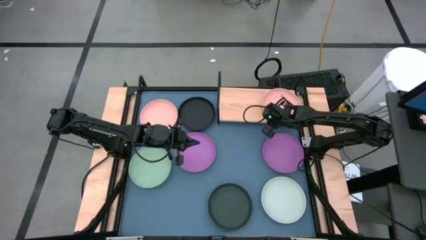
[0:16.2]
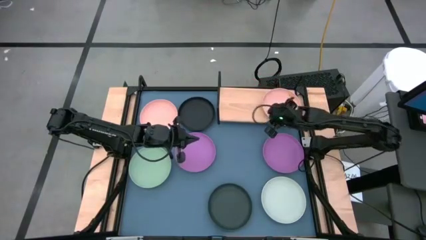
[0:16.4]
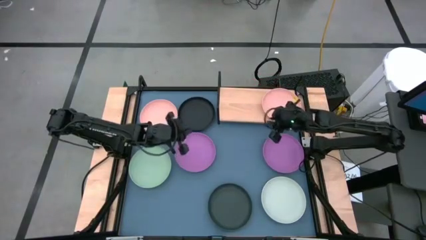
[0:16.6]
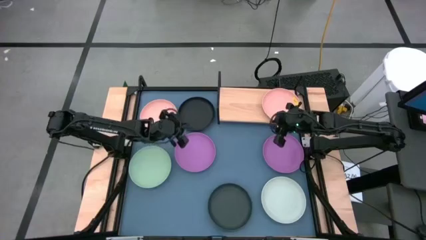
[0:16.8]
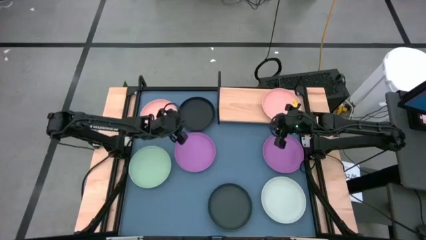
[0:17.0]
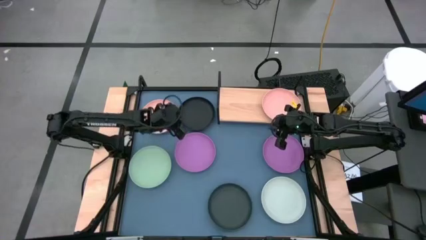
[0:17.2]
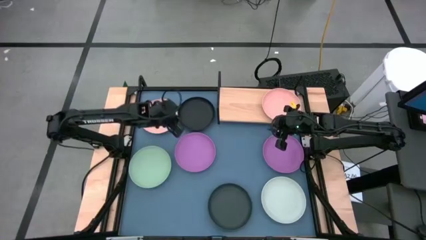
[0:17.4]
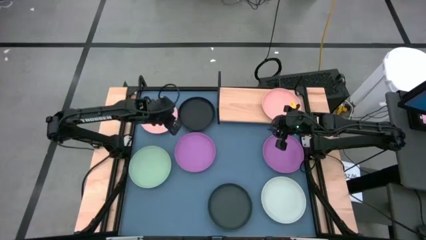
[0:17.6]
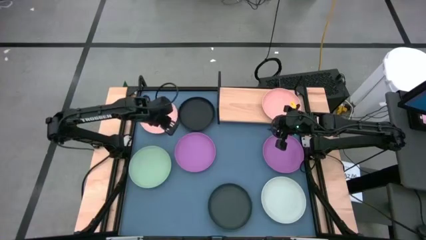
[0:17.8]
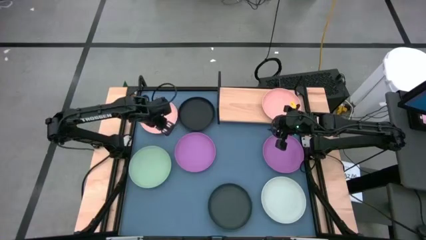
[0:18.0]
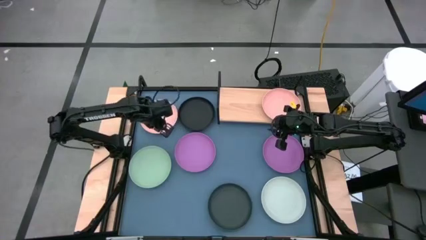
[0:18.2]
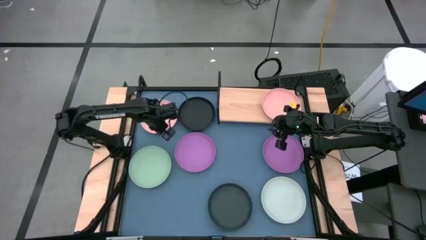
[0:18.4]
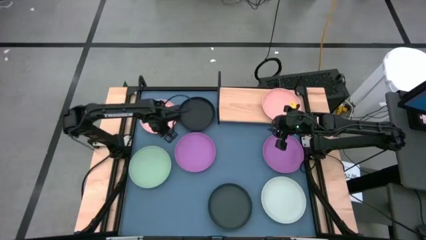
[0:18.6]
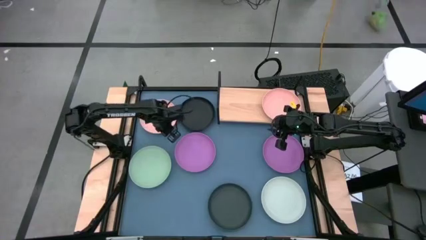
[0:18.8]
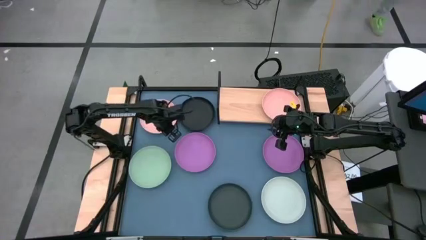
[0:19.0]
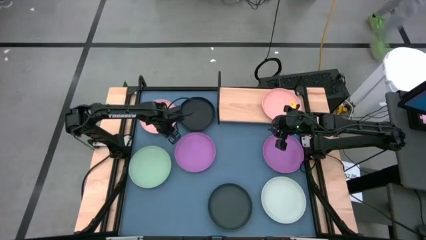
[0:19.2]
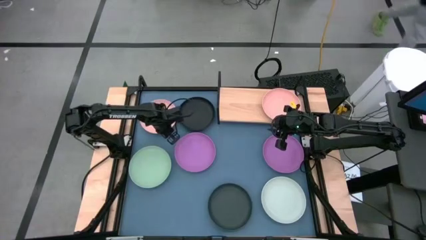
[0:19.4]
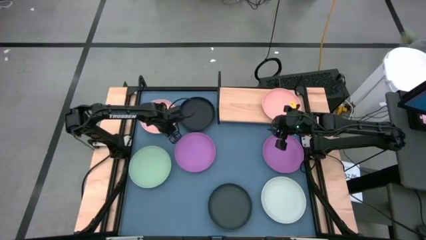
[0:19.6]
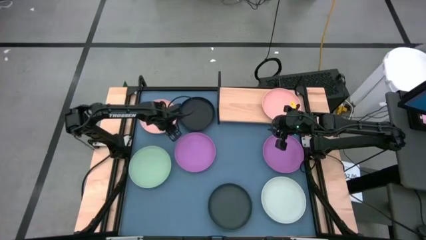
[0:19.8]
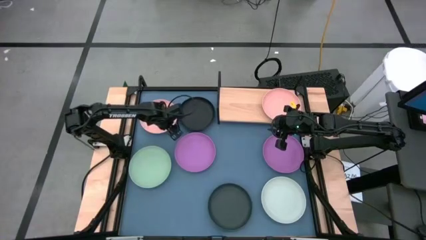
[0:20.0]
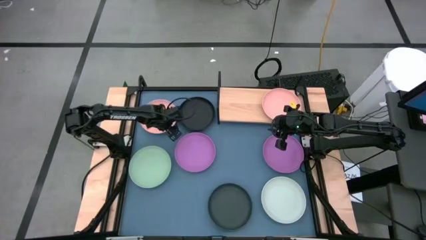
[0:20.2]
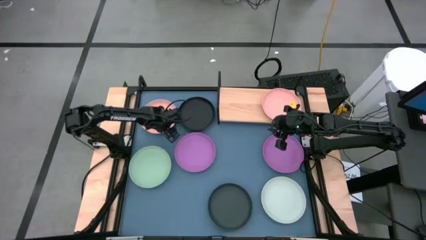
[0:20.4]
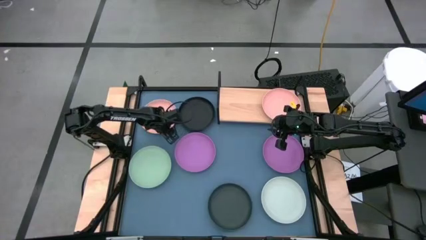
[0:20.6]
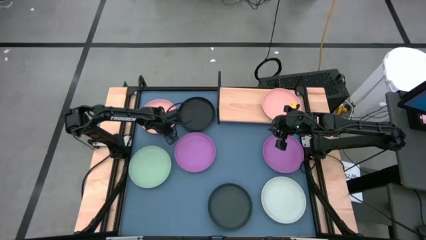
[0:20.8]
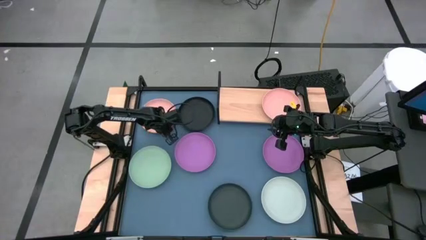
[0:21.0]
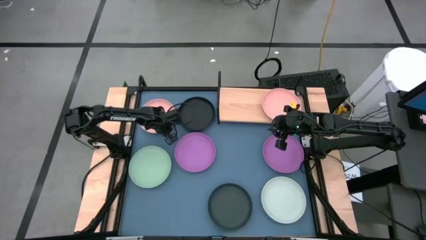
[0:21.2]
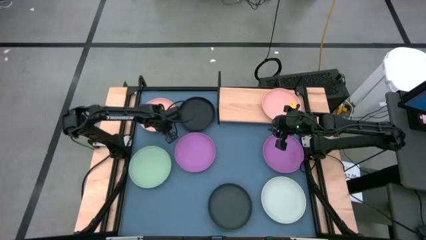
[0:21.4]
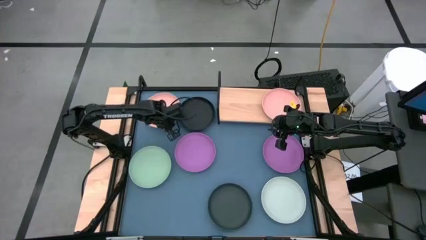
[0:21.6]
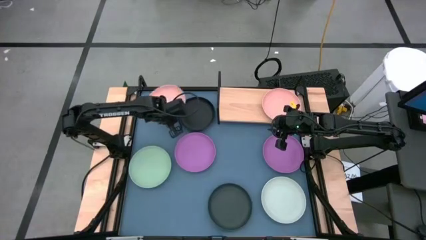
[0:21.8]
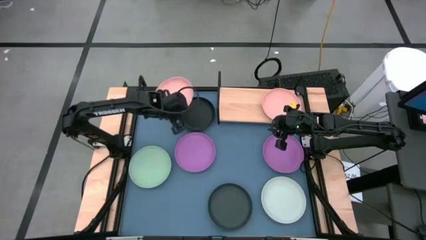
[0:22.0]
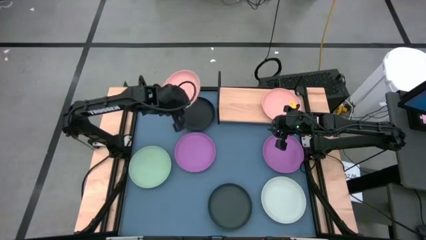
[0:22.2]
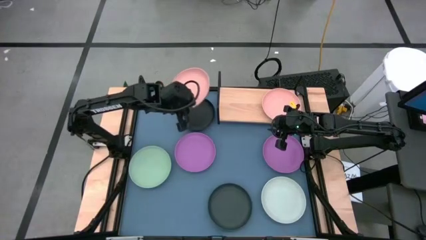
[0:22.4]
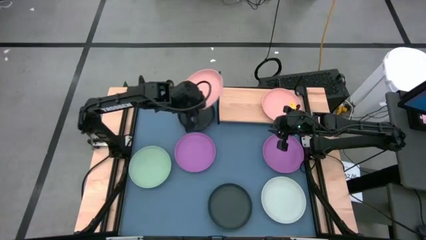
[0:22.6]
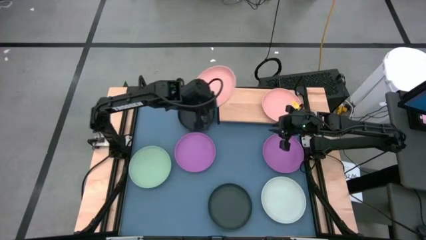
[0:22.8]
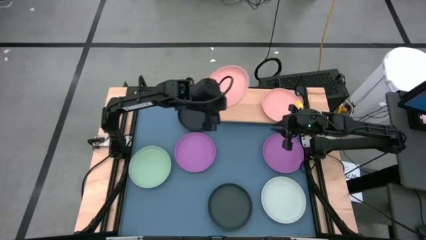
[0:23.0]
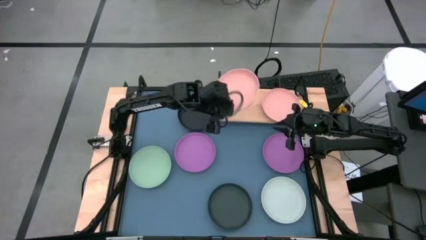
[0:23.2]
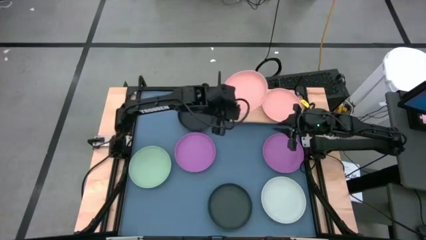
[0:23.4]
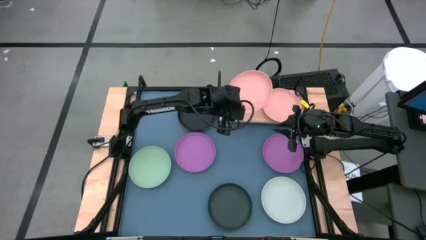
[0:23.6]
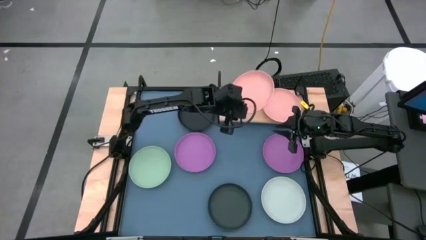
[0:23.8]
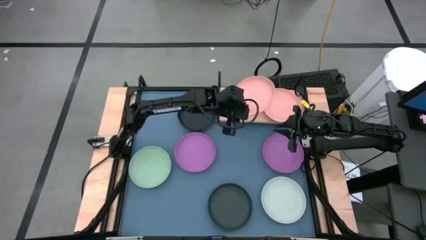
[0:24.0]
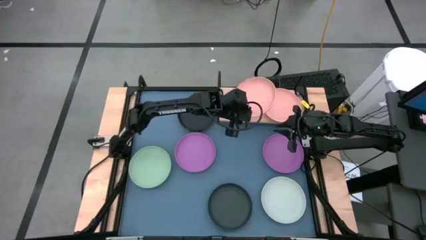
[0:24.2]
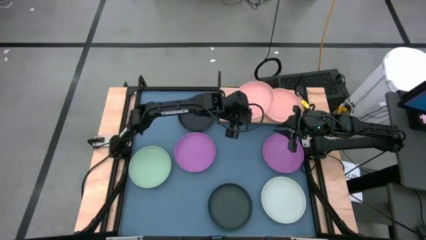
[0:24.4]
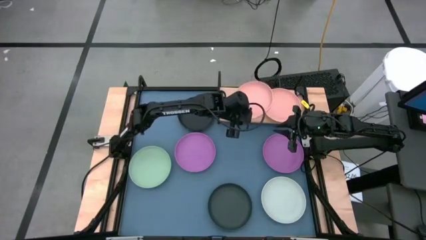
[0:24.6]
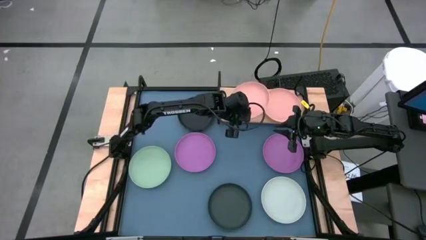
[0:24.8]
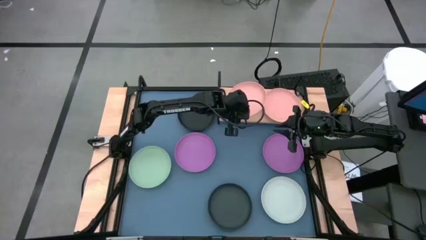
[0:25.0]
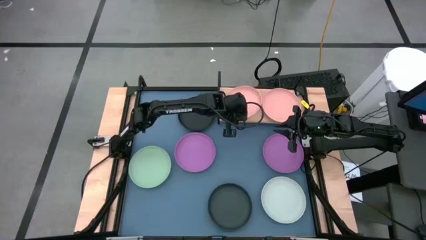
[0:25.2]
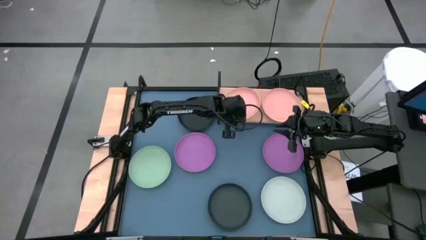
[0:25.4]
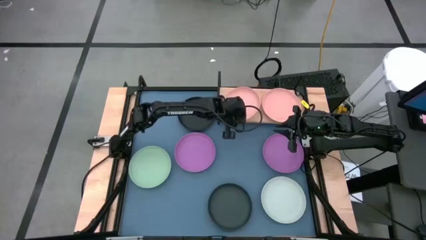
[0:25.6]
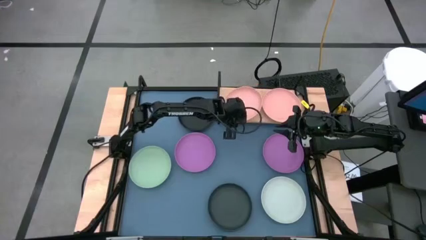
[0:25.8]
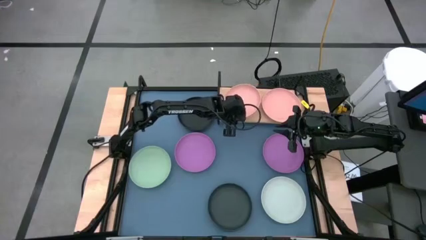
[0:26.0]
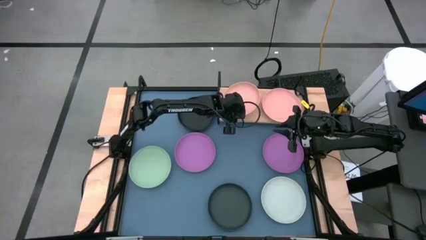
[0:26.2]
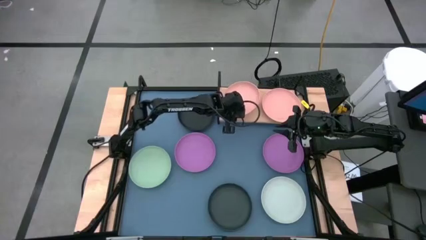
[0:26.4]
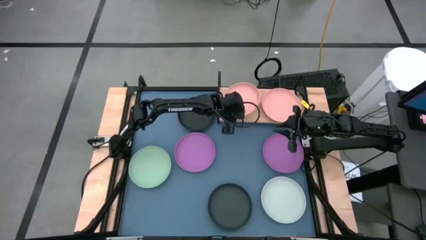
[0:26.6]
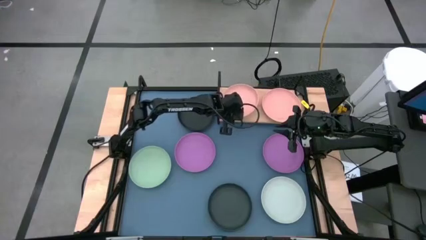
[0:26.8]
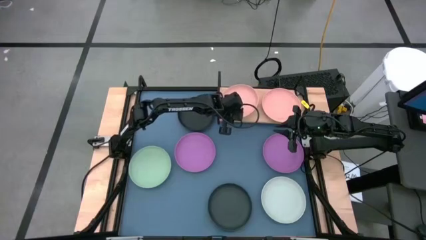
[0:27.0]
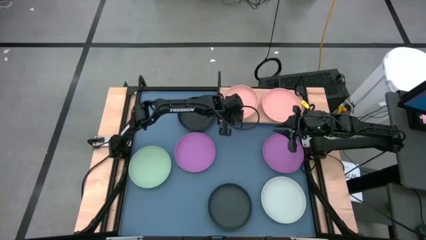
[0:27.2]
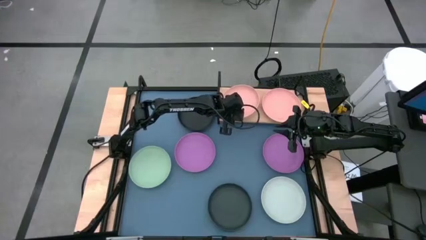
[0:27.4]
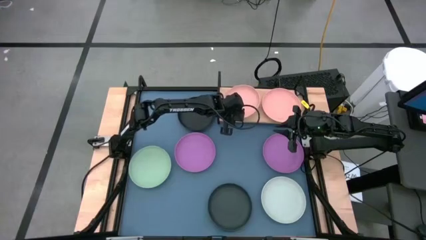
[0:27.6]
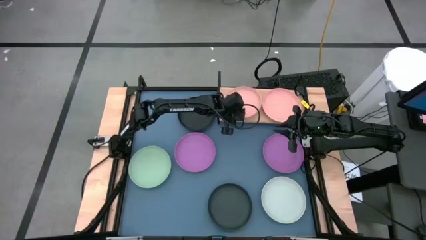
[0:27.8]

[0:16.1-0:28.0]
Task: Place and stack plates onto a shelf
Put the pink plate on the shelf

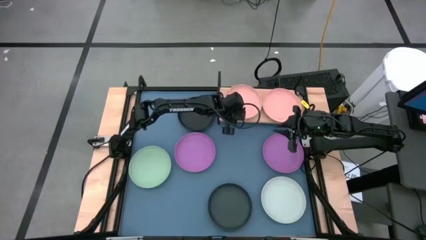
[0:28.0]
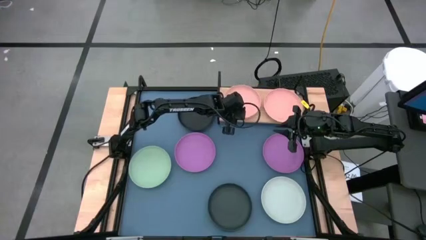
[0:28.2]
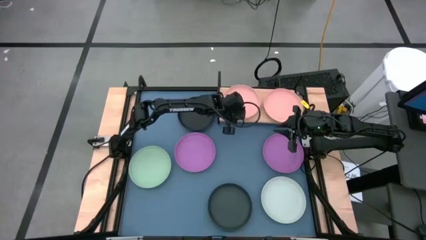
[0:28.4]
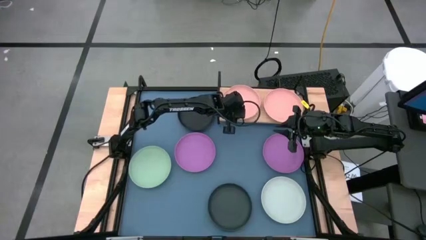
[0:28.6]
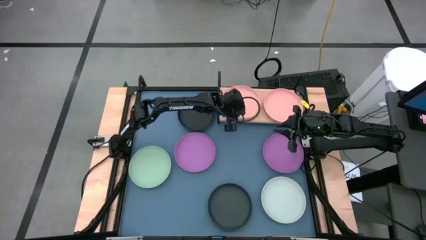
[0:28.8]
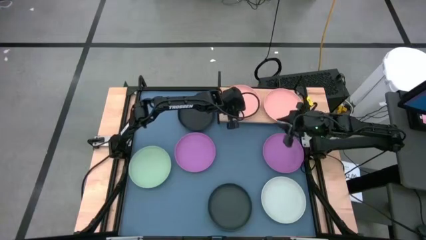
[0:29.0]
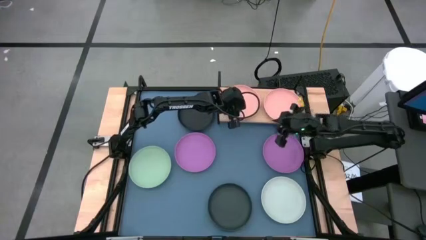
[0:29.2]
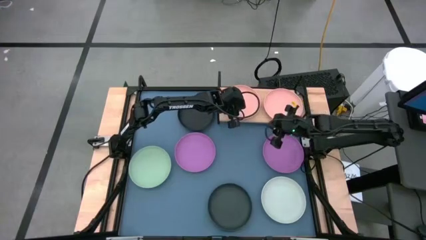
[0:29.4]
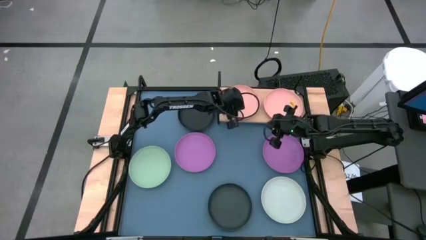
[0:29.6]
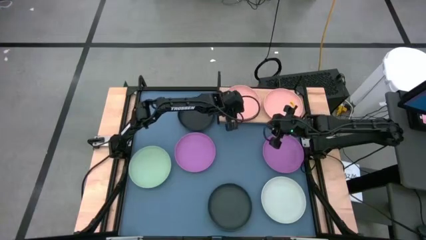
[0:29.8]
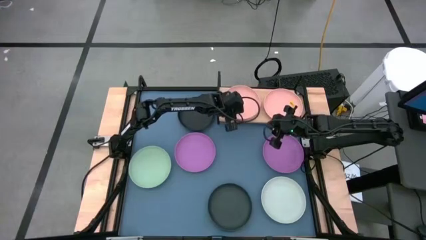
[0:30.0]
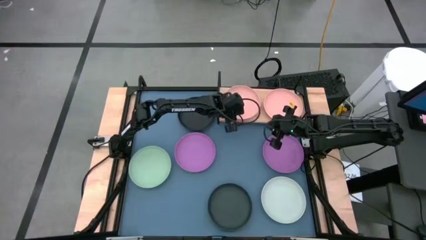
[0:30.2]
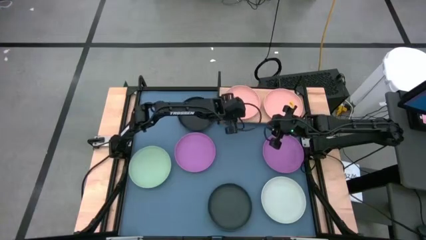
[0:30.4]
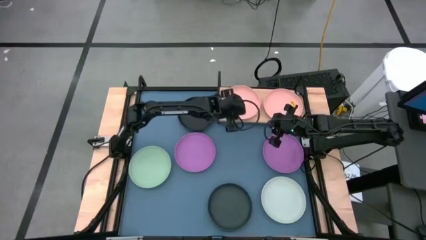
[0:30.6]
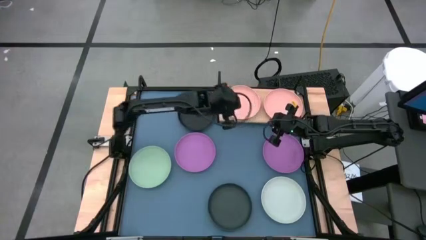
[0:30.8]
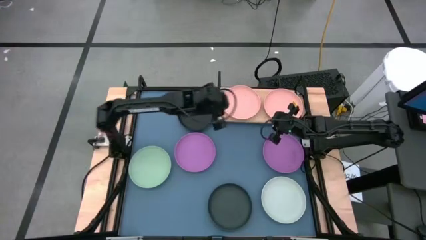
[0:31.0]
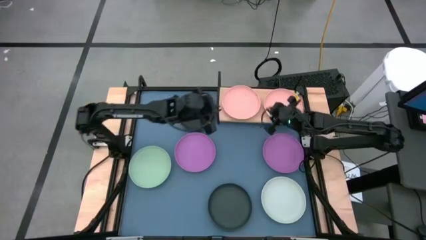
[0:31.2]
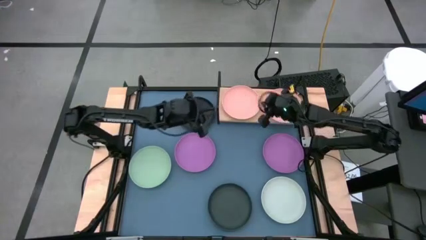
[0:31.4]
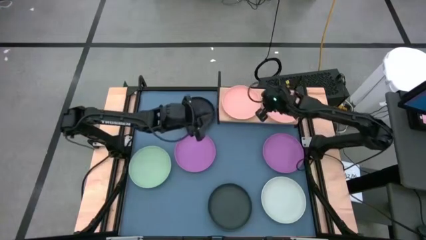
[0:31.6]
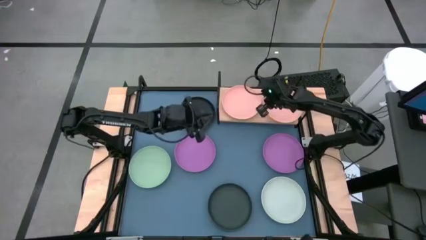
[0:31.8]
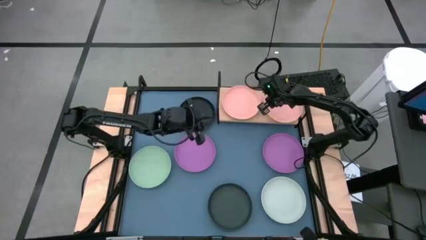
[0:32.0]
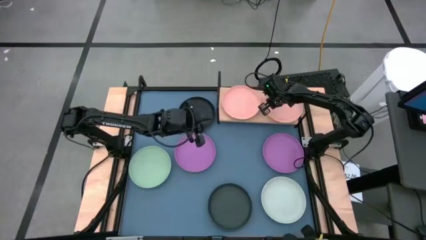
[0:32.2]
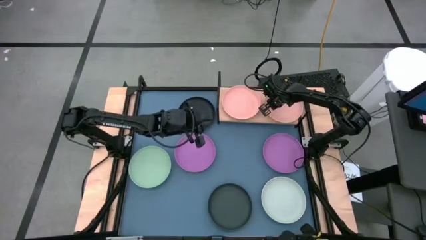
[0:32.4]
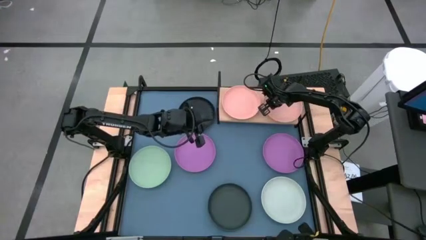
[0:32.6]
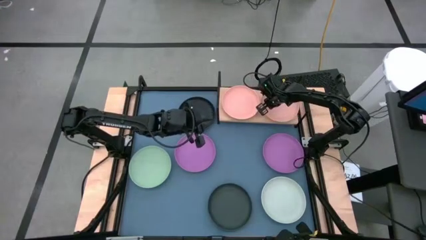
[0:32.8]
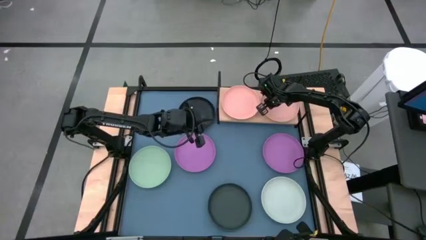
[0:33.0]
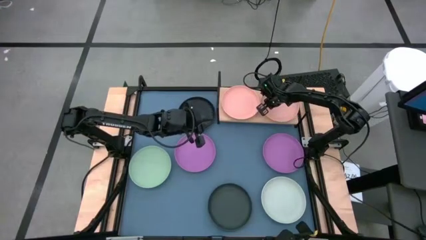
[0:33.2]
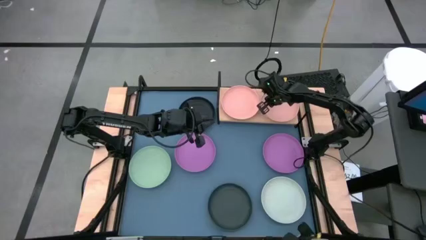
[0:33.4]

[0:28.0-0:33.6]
Adjust the pink plates on the shelf
